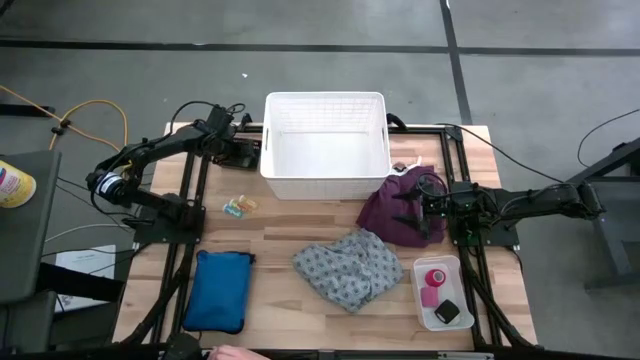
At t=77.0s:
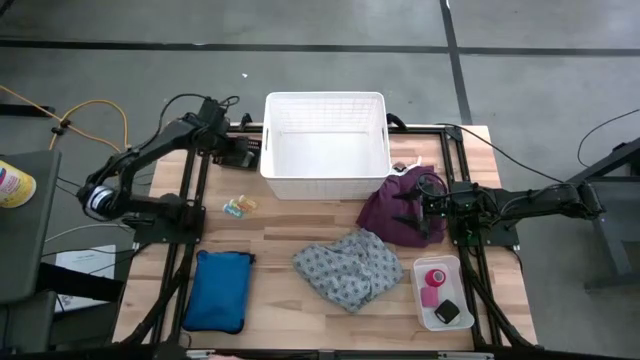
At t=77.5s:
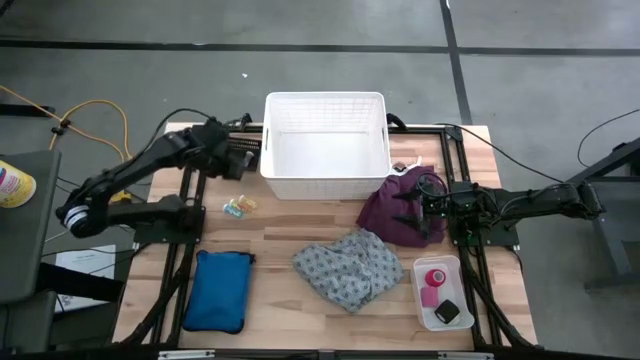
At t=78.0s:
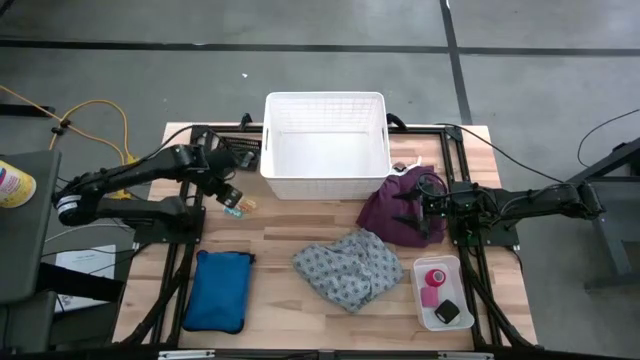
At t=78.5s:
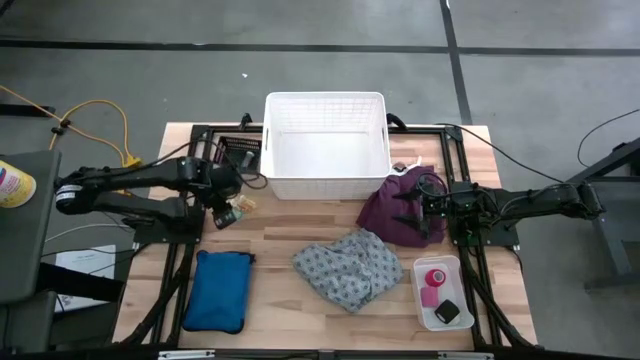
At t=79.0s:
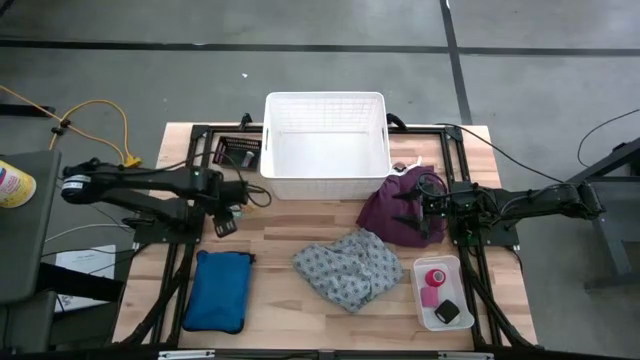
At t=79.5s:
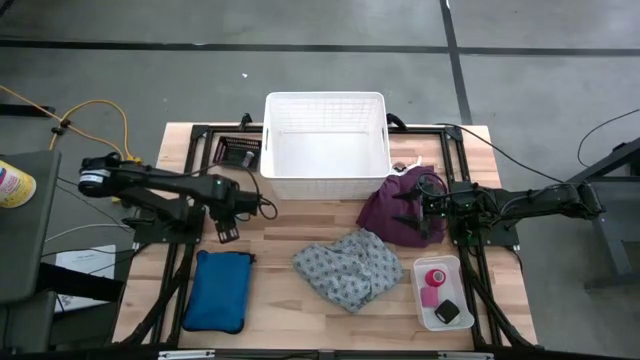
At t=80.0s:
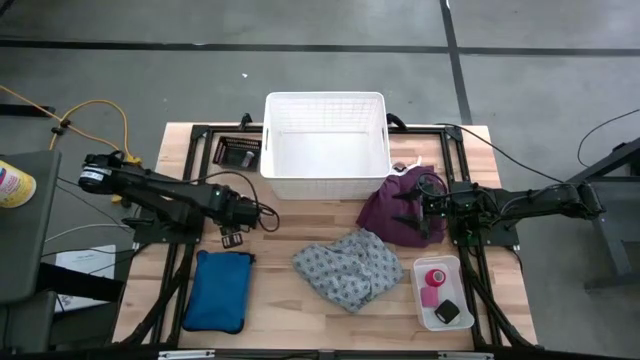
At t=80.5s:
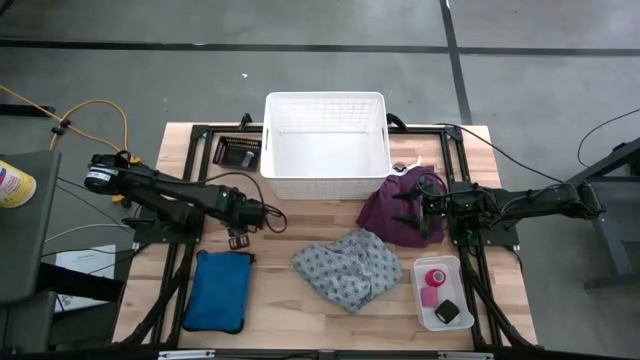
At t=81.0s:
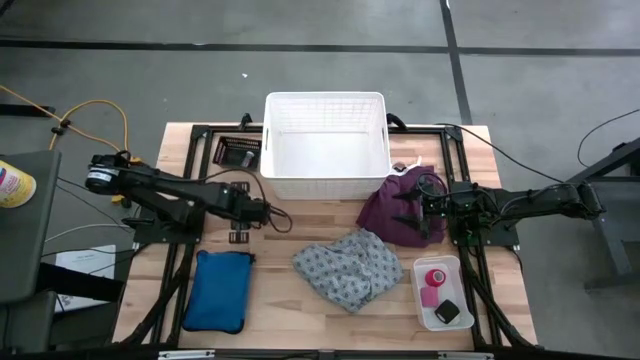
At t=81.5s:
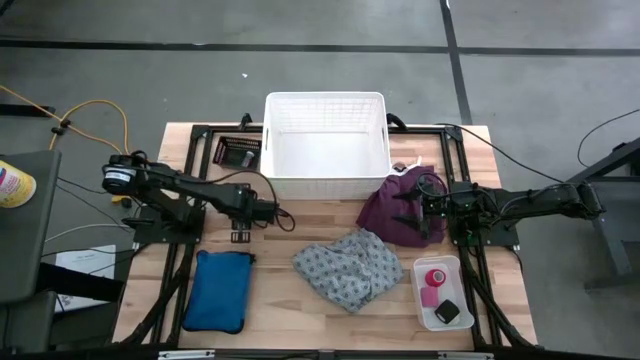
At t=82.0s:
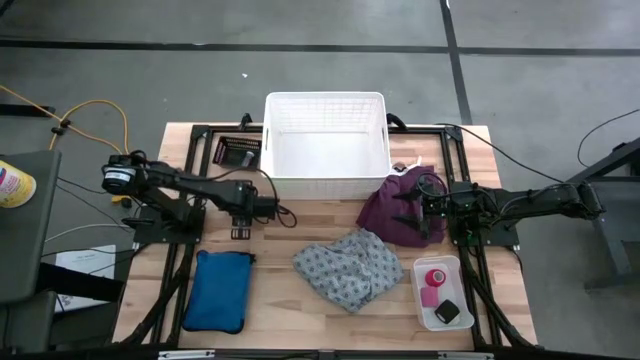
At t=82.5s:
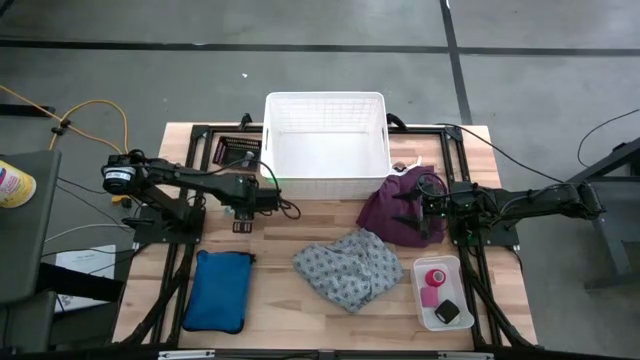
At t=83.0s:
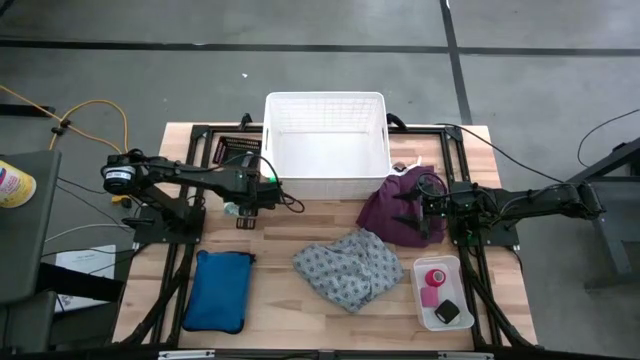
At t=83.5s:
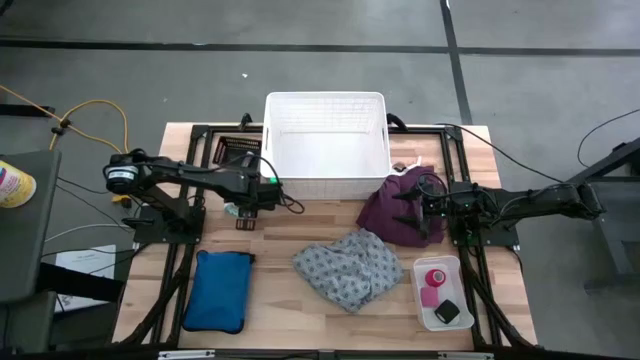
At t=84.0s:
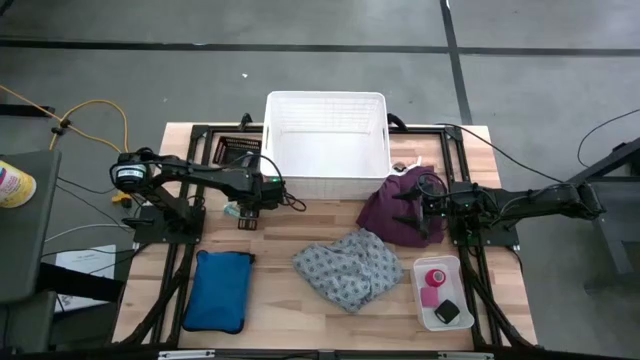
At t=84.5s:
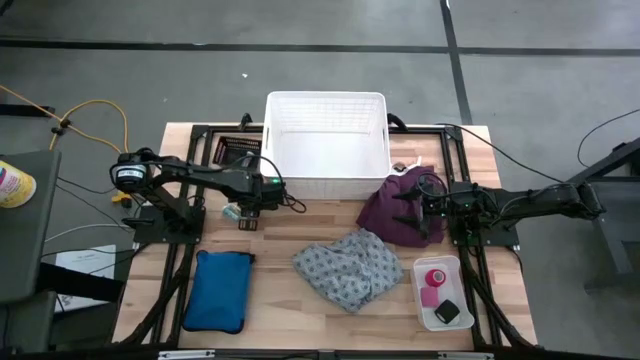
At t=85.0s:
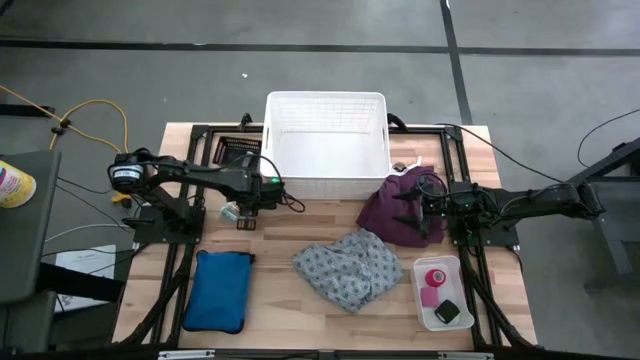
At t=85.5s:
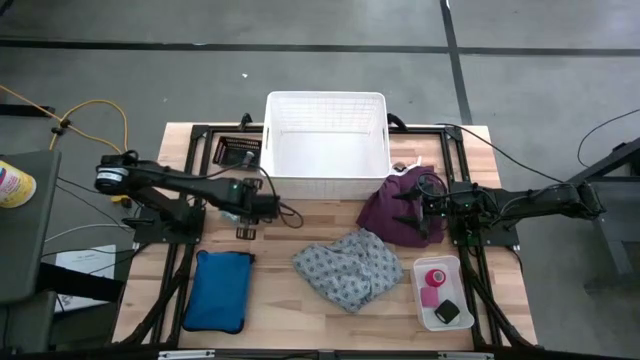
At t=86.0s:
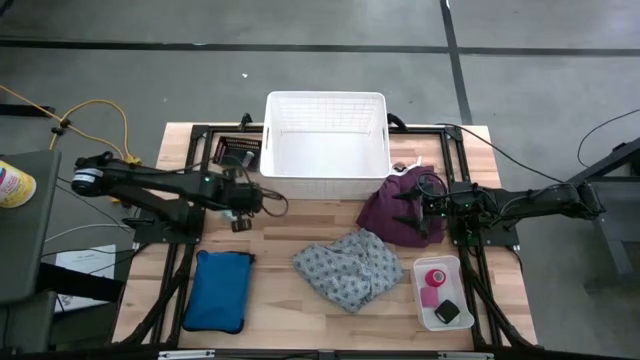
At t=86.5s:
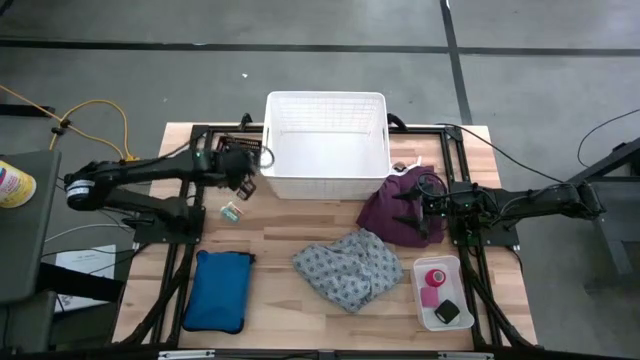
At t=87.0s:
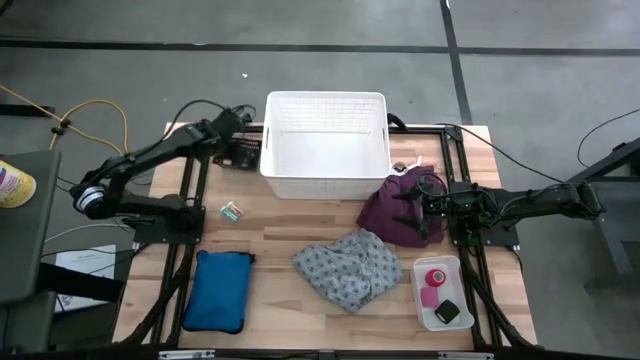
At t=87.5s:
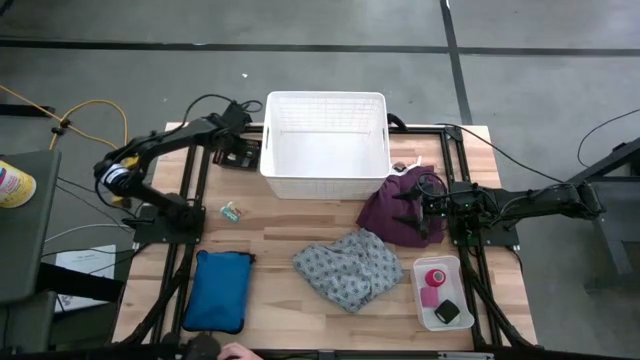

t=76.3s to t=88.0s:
Task: Pick & place medical supplies in basket/bin
Put the top yellow pill bottle into the black bin
